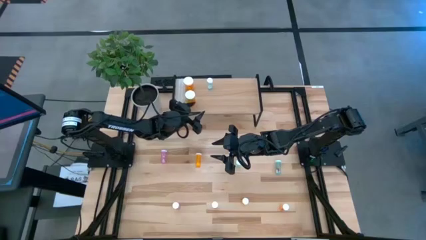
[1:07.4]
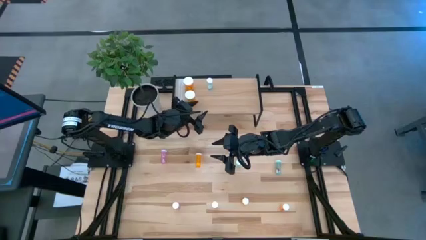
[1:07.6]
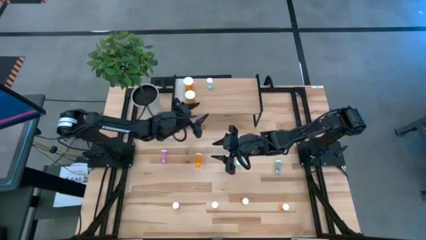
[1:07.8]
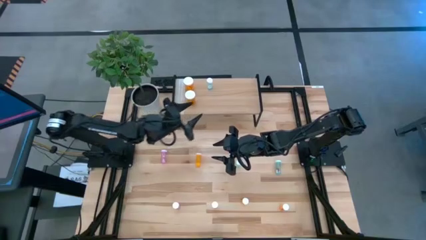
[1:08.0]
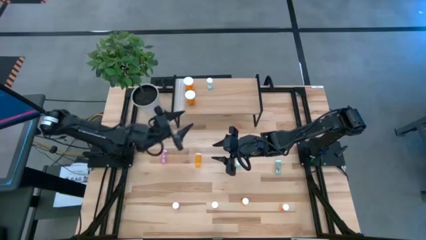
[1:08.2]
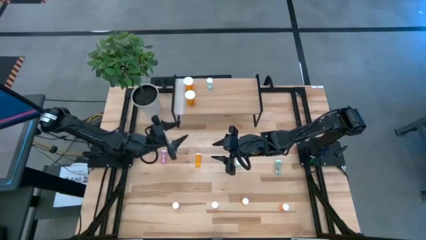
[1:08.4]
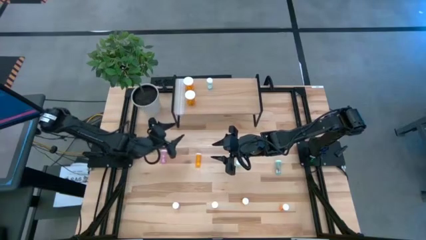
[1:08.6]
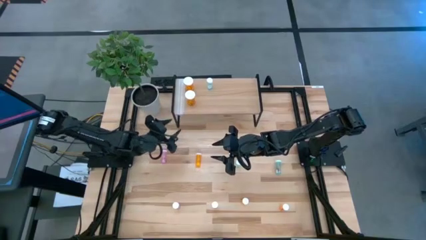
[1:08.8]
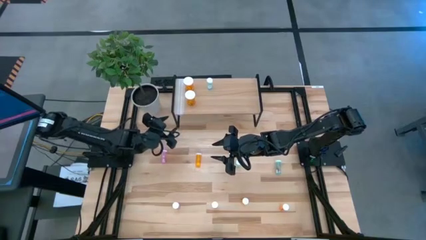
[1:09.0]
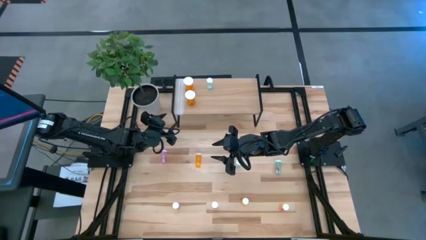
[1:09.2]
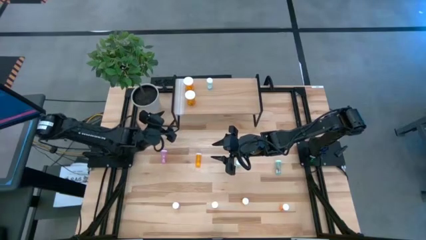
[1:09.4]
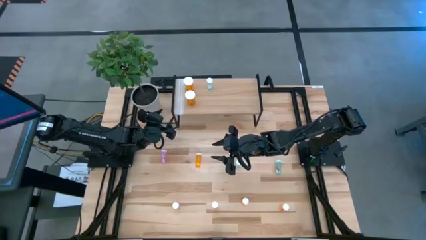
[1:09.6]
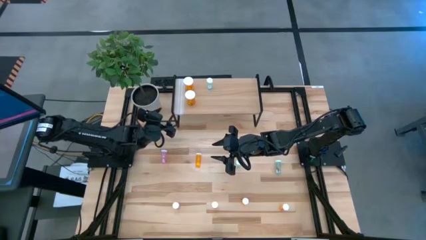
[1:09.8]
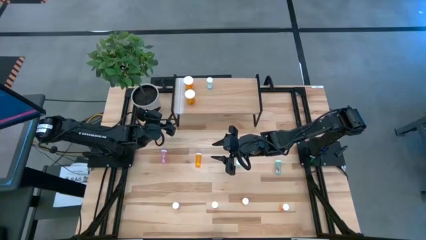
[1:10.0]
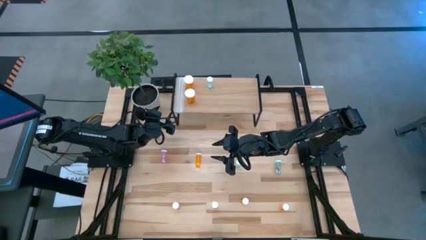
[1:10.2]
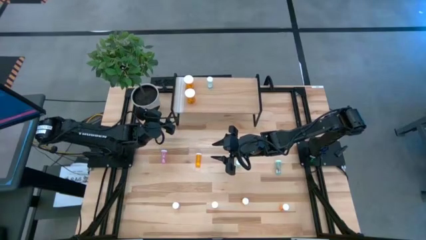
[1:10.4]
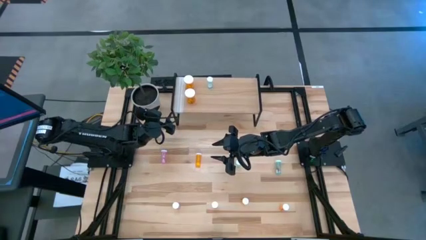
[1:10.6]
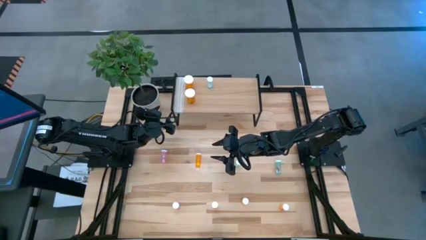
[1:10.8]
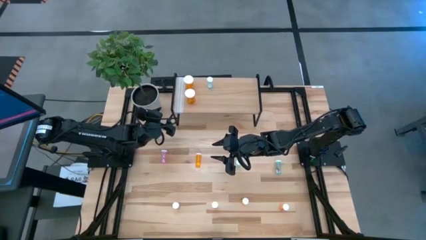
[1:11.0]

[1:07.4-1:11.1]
Task: Pick and place medicine bottles onto shelf by color
Adjust the shelf

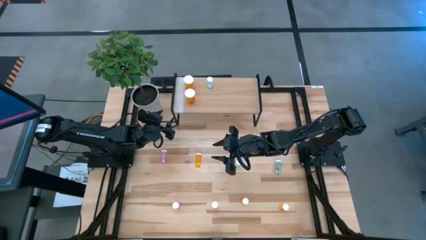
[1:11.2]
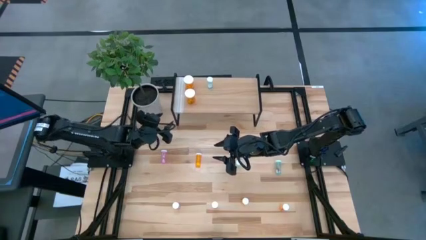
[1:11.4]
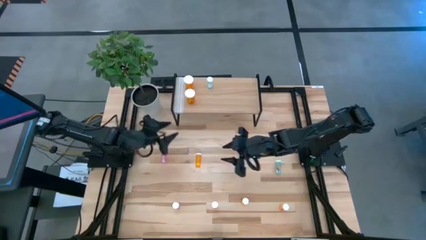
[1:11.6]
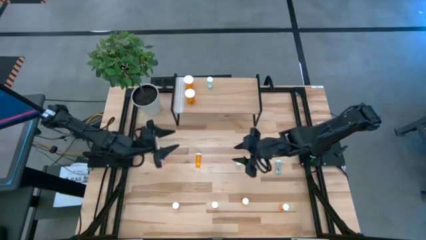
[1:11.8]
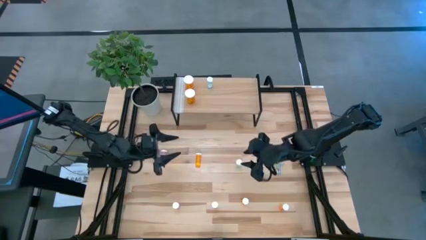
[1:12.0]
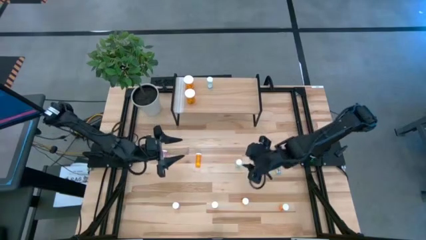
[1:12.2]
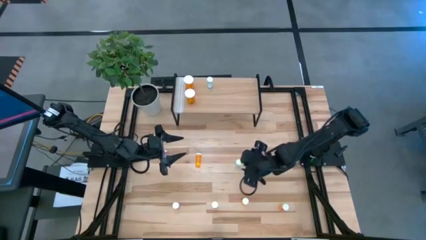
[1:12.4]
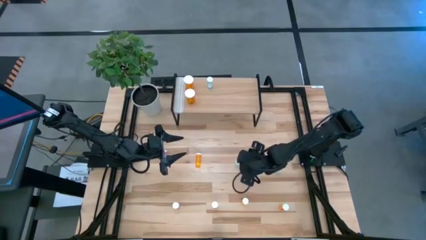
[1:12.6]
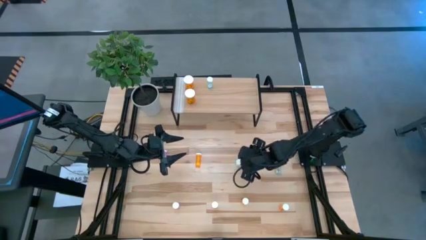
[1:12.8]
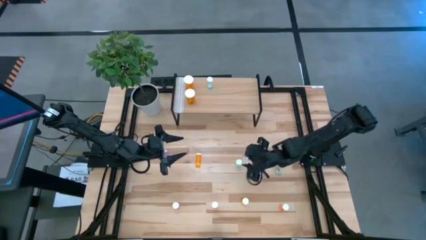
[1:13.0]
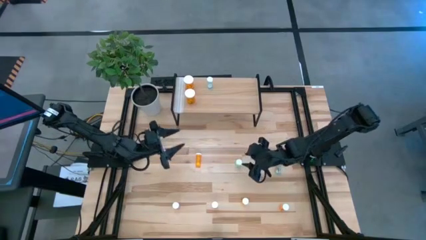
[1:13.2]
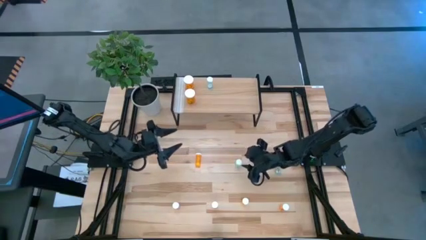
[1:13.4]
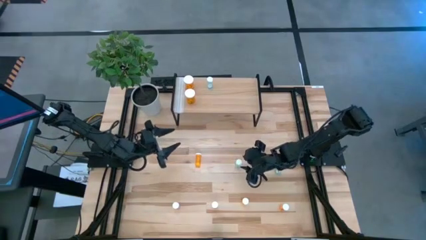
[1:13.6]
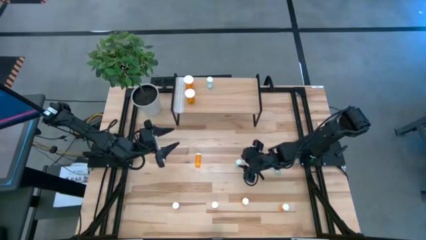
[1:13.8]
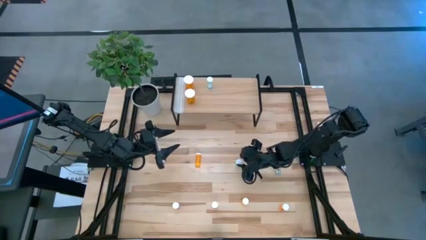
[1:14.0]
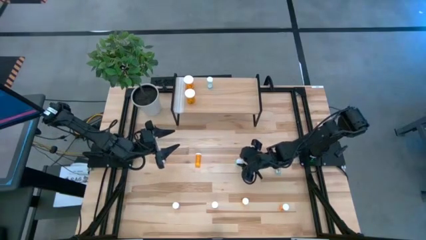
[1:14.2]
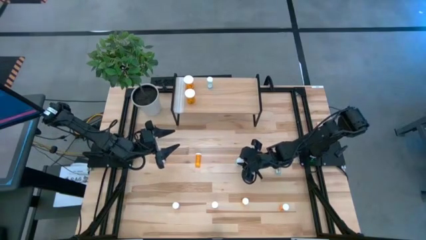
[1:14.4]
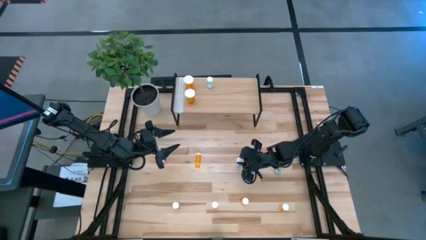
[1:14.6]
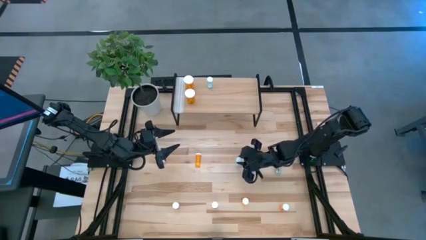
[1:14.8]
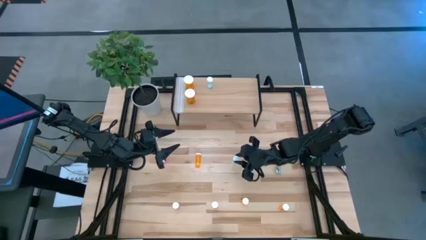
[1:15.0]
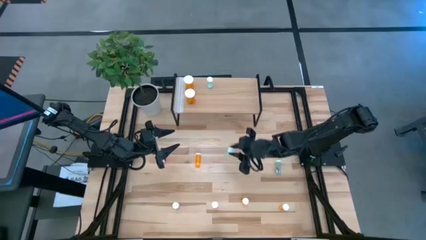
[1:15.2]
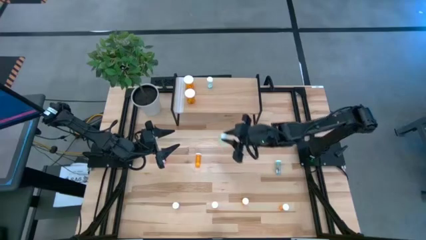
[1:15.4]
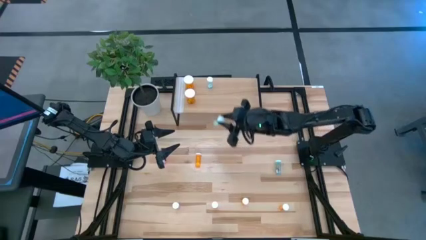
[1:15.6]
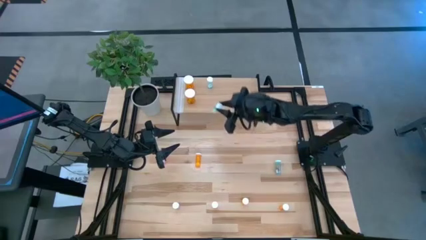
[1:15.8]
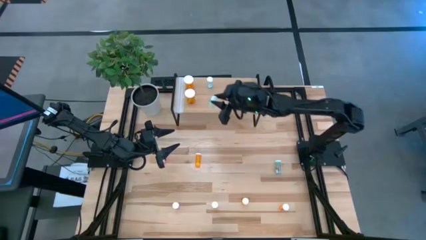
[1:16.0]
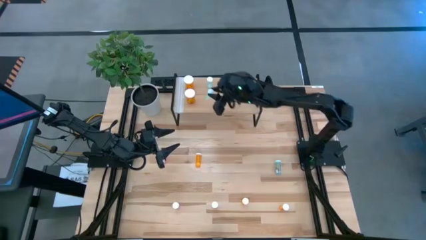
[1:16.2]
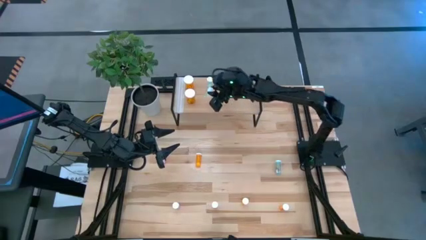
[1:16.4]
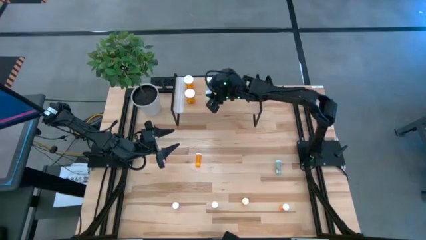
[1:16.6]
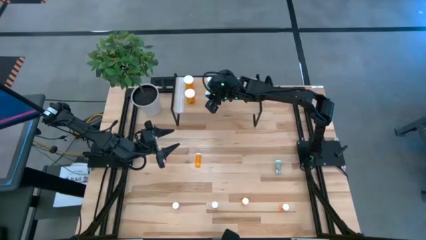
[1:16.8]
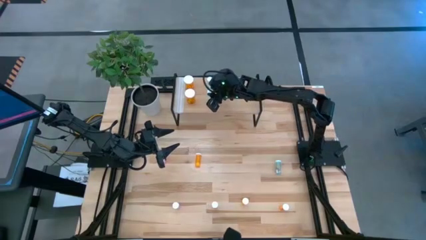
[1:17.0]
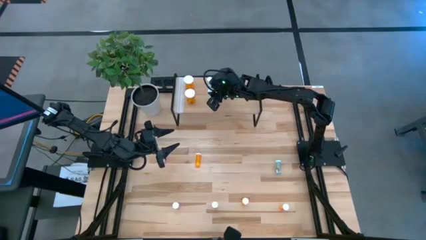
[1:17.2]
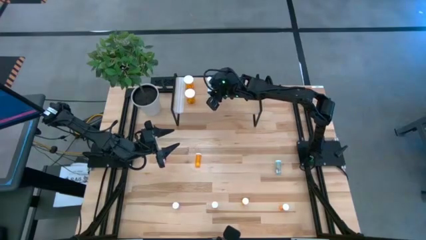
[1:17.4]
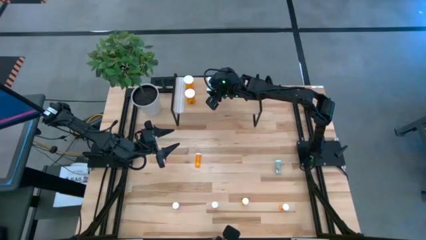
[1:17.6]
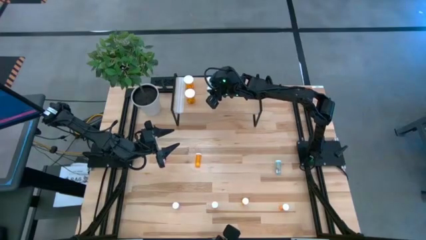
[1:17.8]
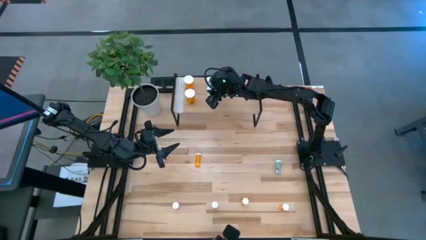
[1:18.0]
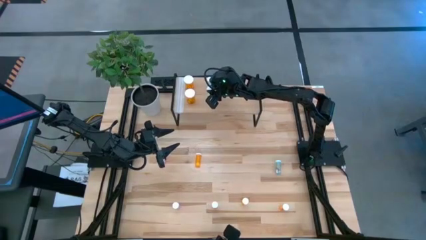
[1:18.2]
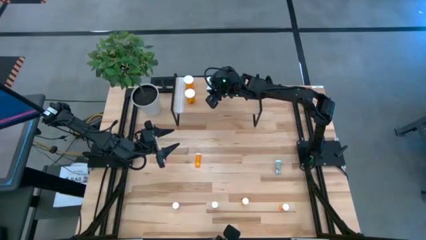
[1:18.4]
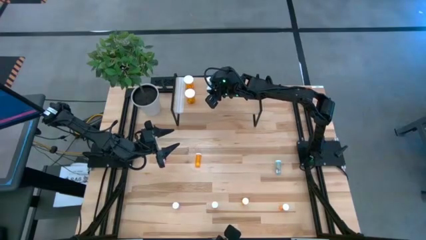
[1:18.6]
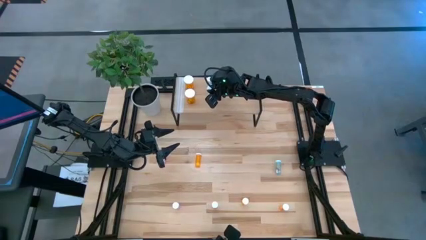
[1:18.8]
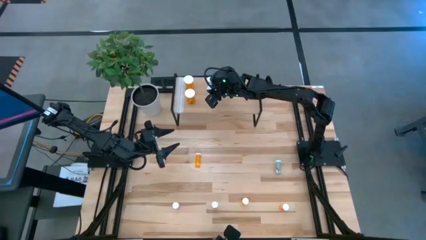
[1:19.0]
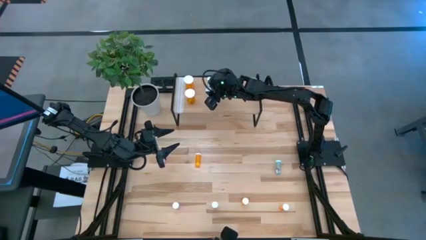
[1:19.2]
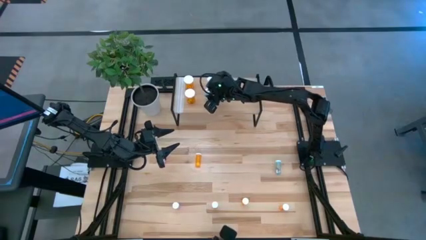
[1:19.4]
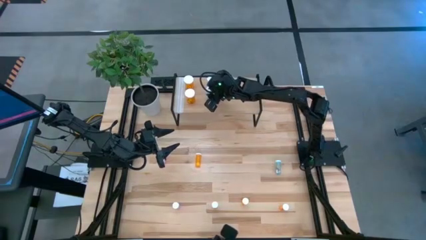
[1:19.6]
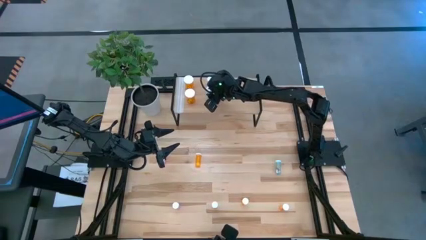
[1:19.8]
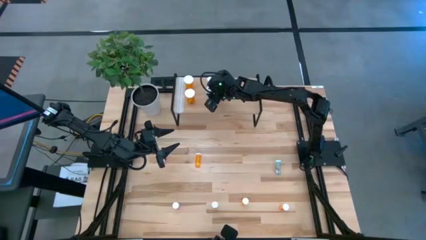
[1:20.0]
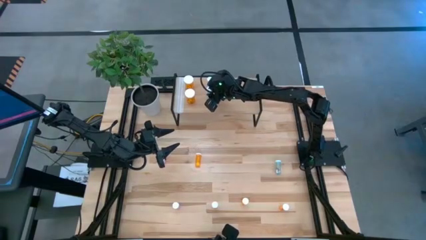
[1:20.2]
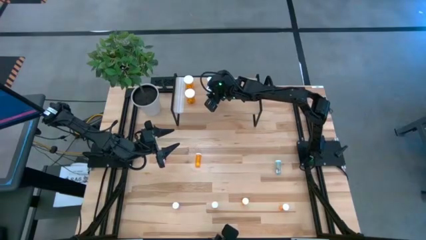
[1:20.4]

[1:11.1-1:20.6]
Put the left green pill bottle on the shelf aligned with the other green pill bottle
